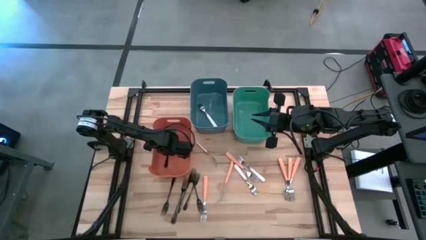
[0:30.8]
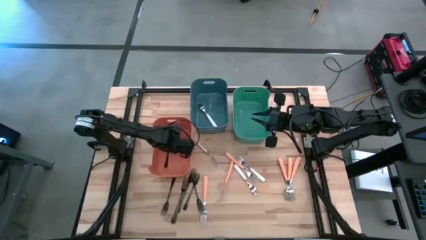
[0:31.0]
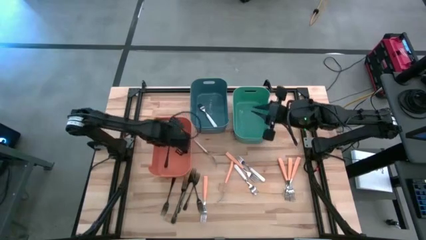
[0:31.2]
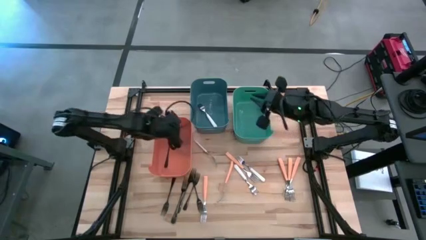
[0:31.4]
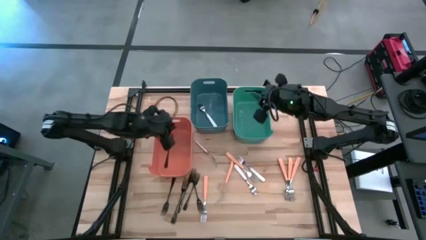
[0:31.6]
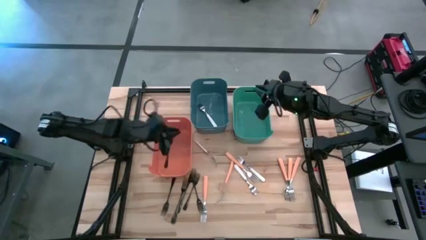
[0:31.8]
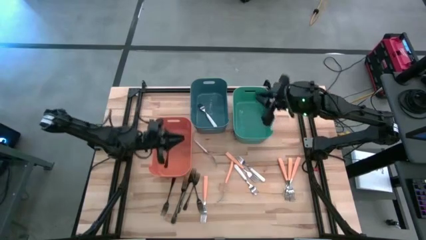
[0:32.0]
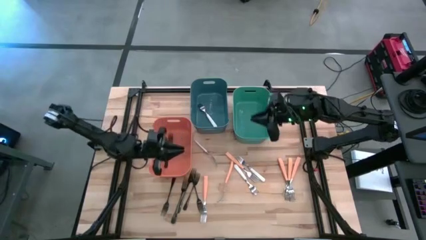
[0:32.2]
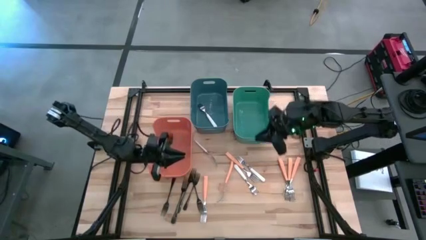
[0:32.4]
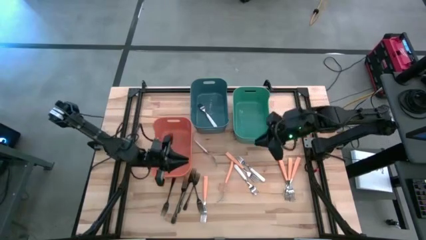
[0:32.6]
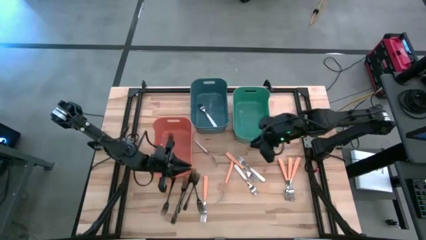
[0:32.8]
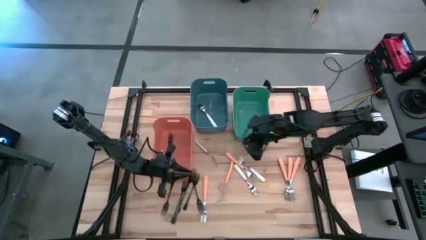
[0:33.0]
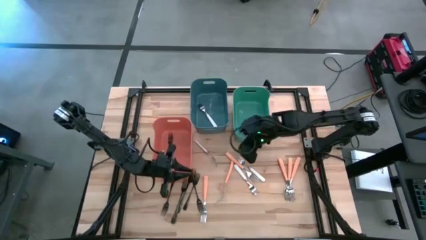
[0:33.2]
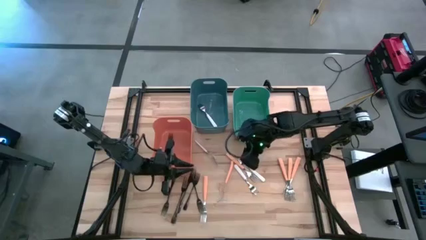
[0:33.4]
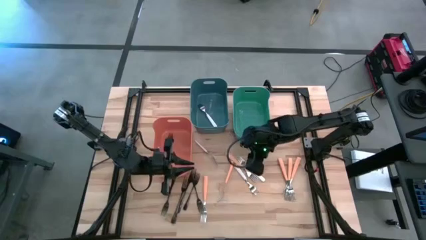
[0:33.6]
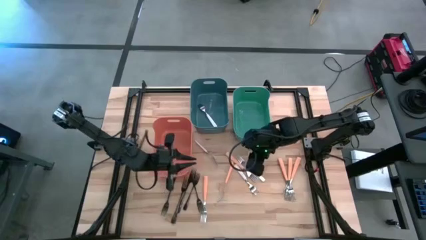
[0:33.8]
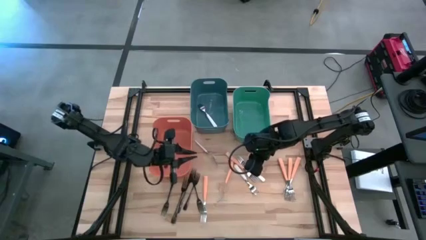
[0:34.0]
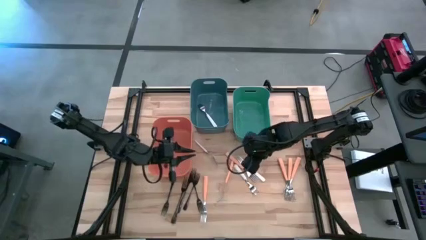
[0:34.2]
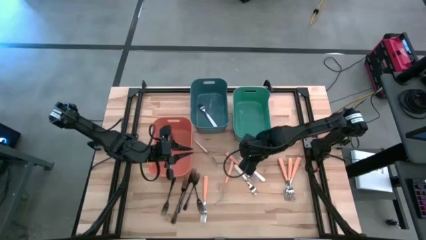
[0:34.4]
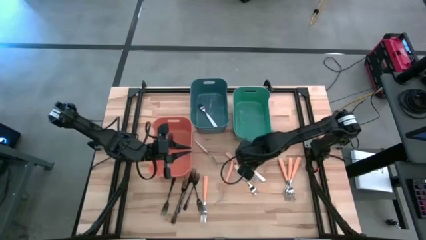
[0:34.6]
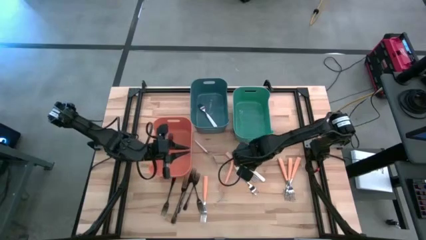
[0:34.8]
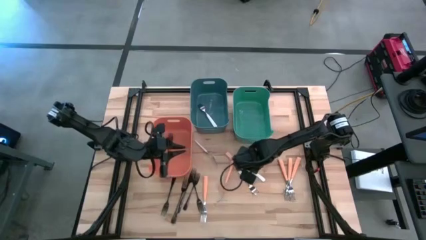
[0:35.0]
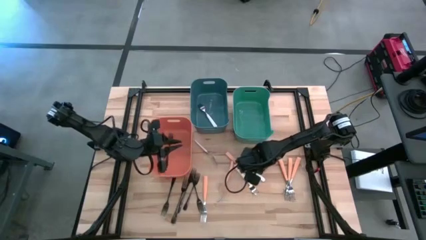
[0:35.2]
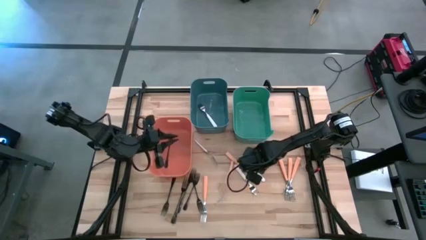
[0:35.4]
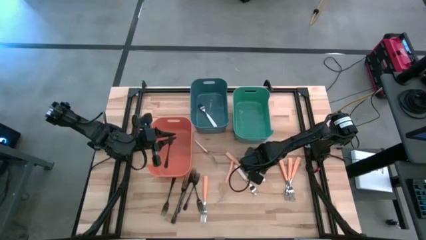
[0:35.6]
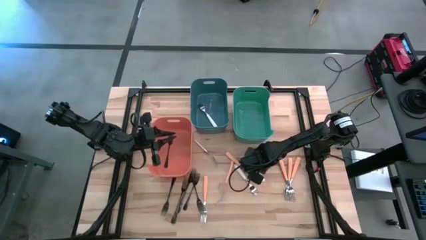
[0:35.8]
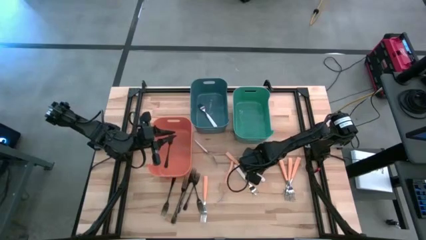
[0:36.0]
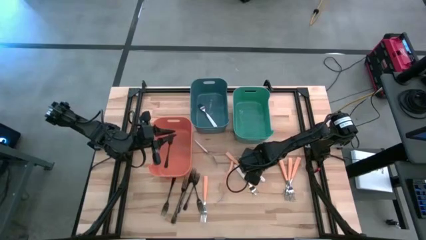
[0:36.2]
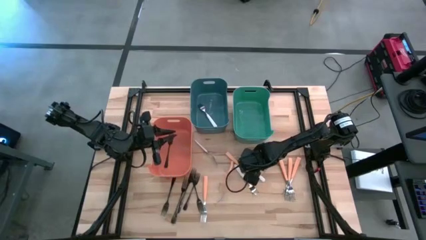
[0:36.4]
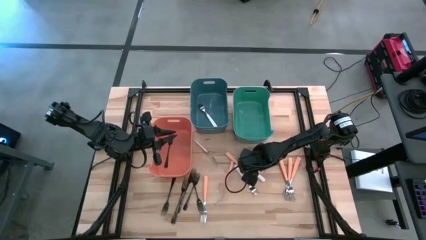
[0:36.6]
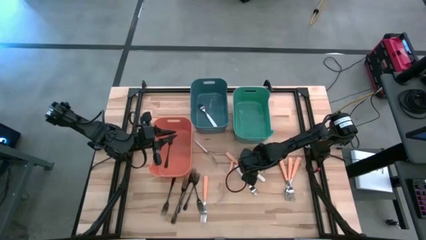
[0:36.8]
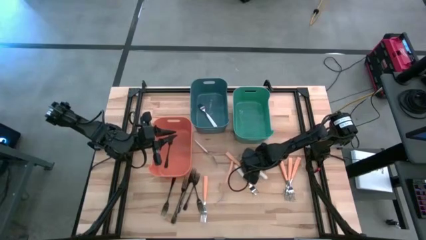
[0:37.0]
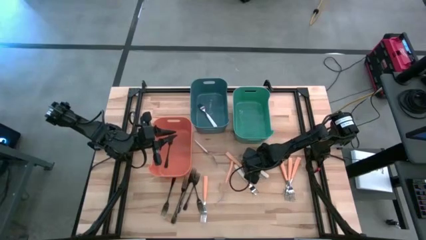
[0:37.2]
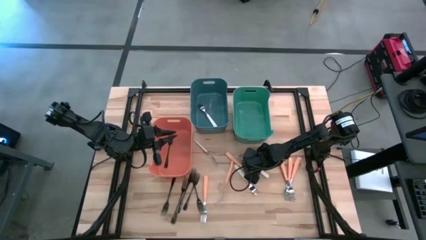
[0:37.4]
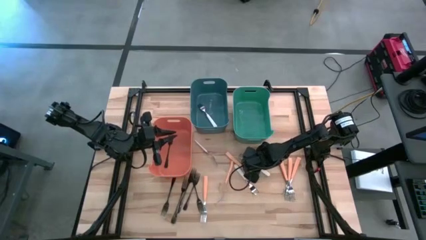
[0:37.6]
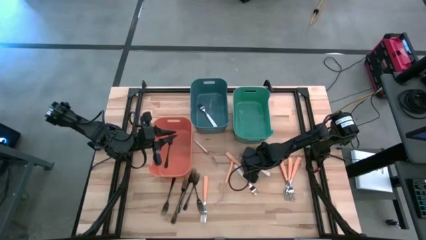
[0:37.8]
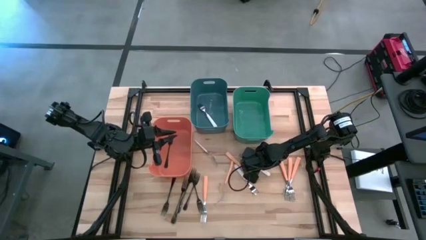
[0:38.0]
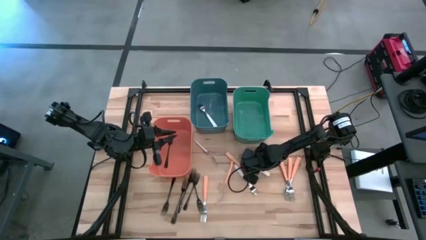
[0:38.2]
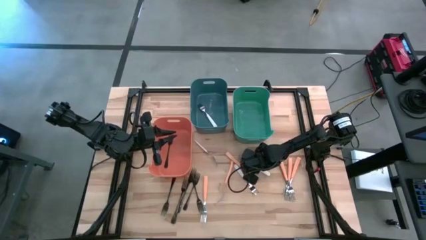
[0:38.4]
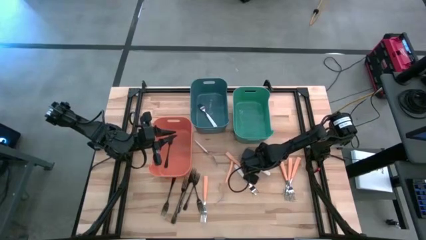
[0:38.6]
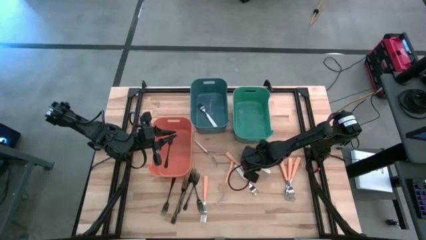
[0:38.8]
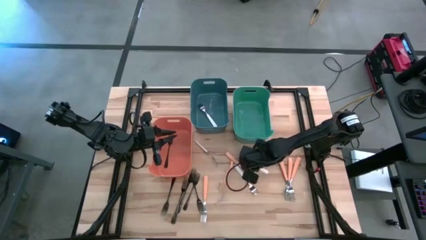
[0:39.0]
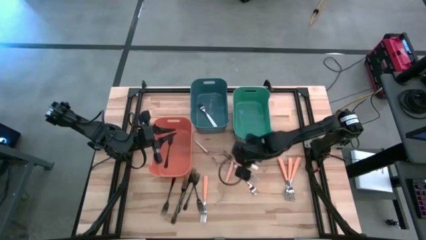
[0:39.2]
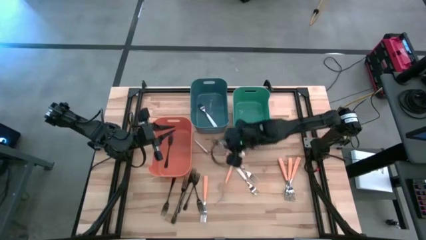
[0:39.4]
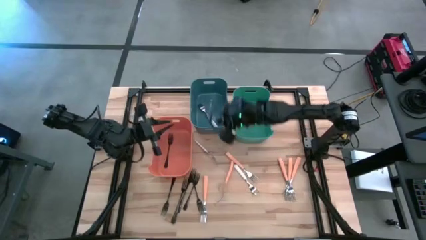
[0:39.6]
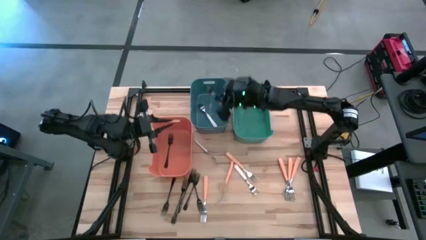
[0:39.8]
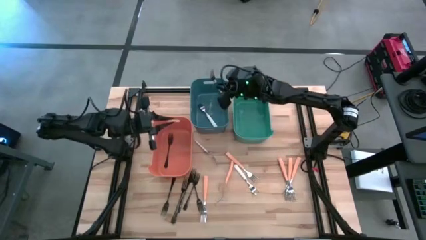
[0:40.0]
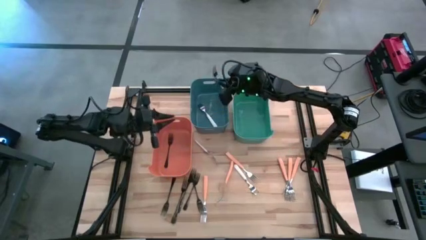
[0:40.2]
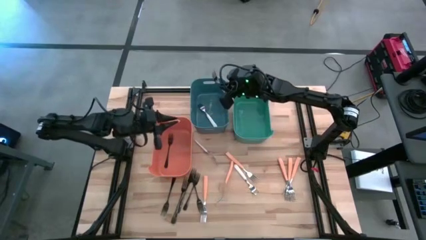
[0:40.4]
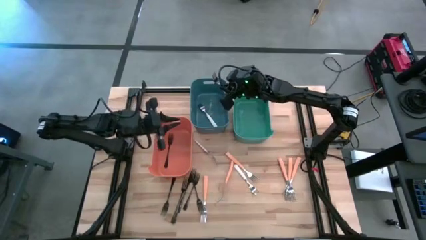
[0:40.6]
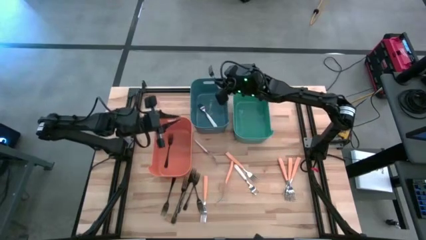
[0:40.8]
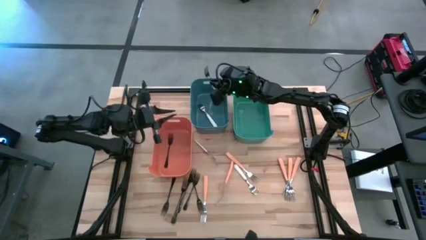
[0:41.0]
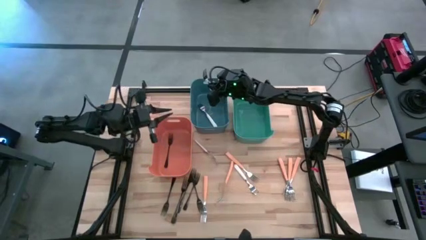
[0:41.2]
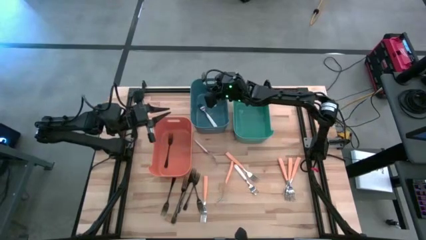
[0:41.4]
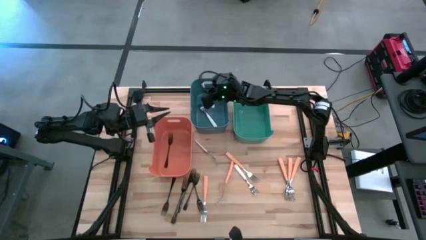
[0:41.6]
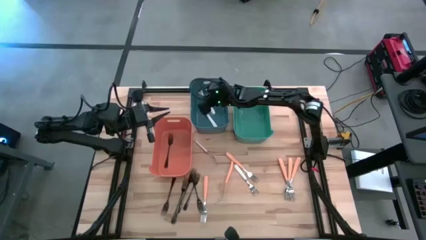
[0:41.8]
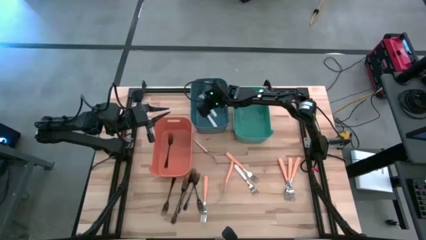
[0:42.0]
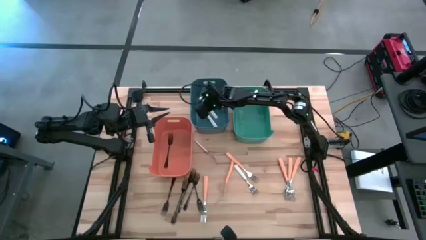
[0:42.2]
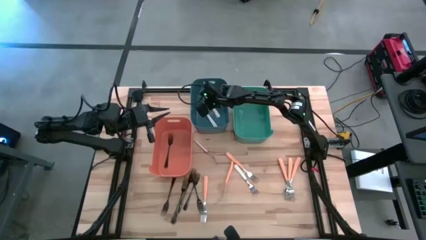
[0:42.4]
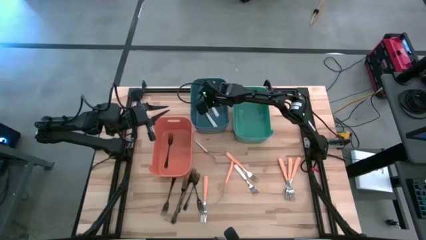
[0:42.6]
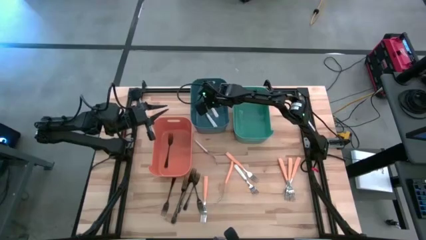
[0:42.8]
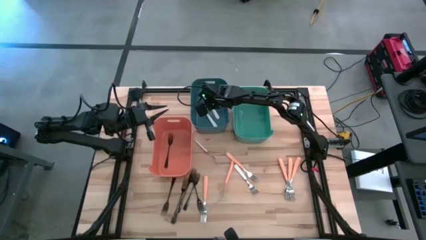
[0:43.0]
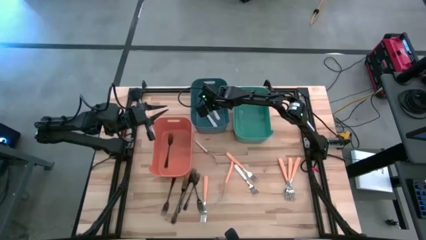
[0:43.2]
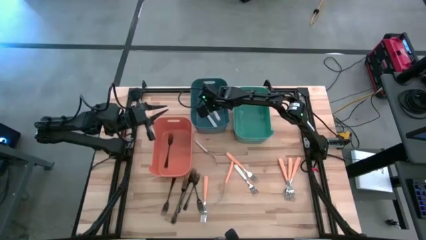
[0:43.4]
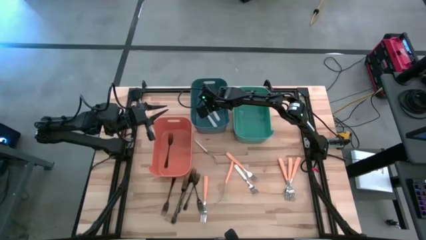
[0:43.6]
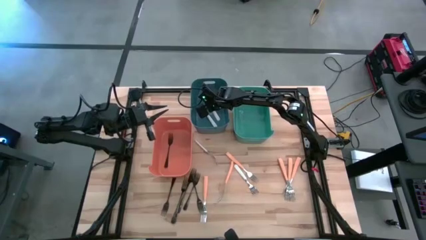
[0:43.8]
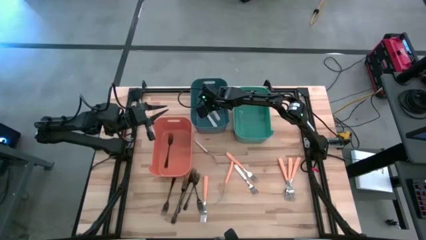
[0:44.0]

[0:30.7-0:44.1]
Task: Sort silverware by color (type)
Put the white fork into the blue bin
